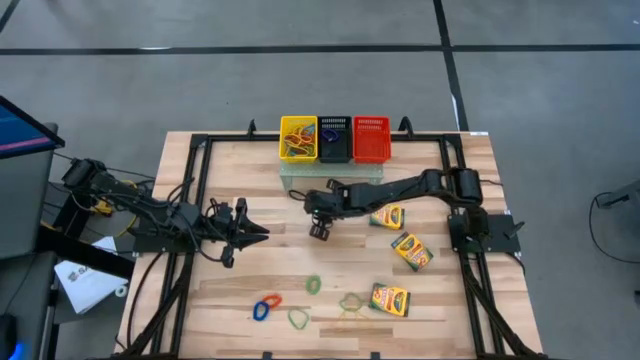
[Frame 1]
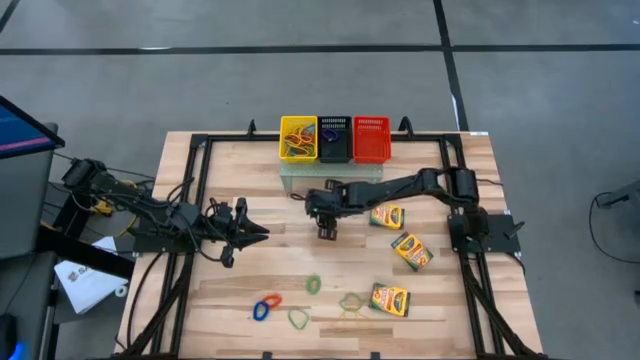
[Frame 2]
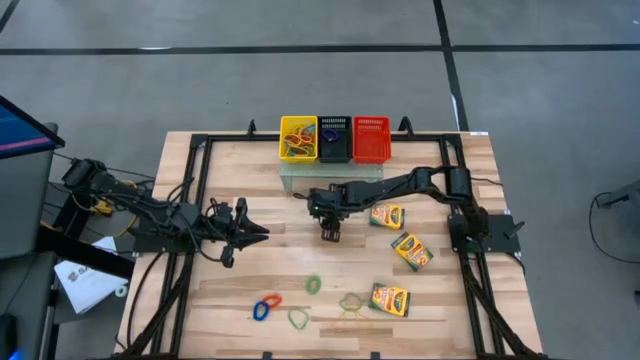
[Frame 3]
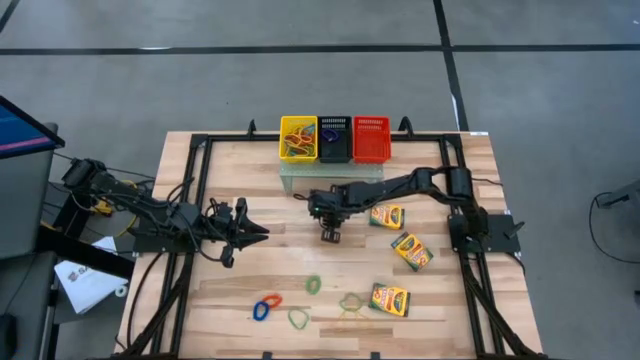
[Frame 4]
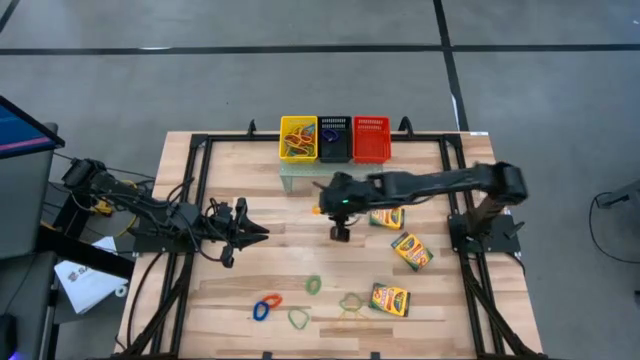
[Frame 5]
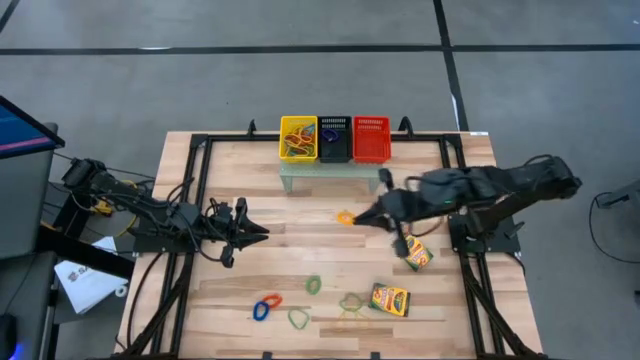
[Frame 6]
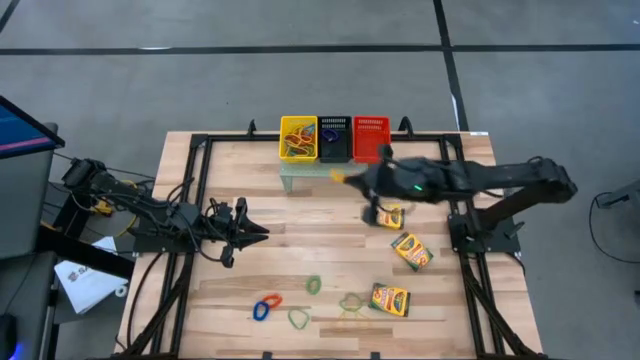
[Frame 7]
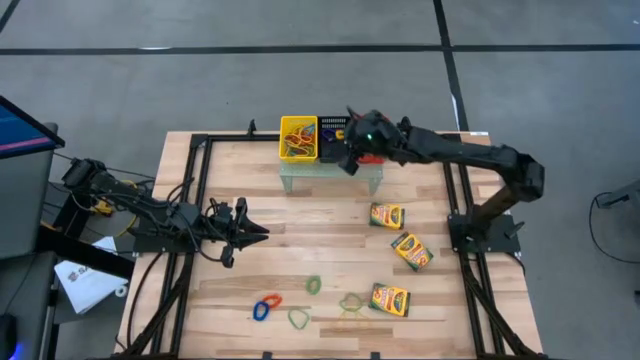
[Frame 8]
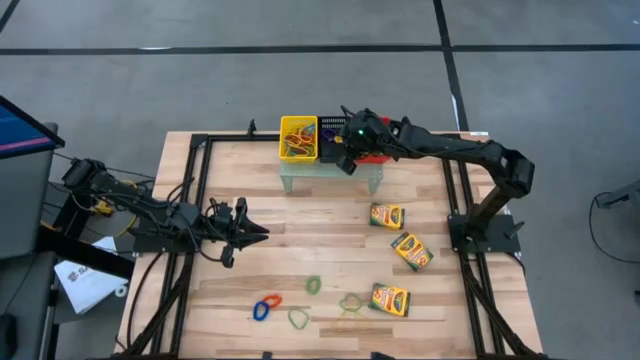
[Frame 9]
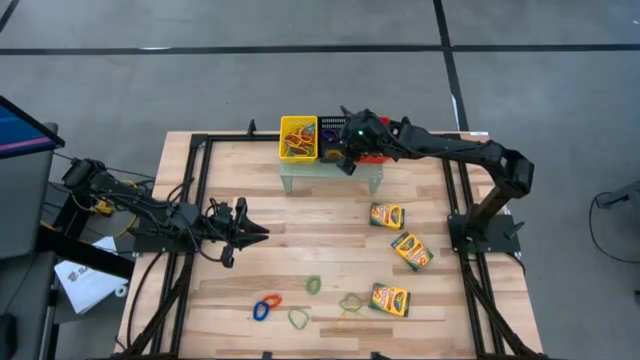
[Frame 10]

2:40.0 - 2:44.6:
Task: Pick & Place Office Desk Supplies
Put the yellow spring keychain into the black bin on the shelf

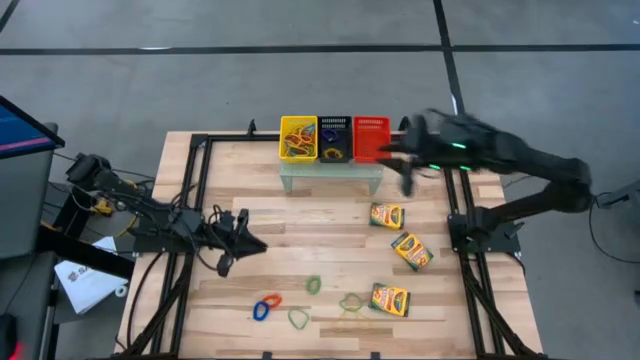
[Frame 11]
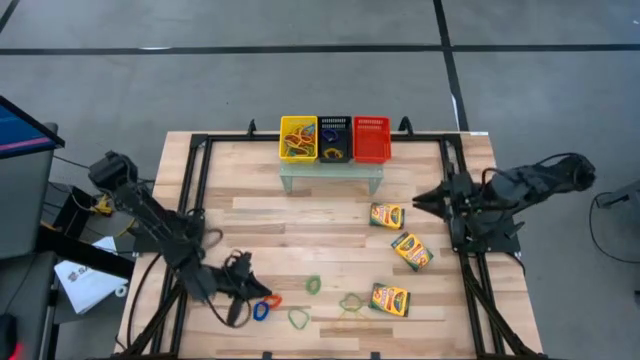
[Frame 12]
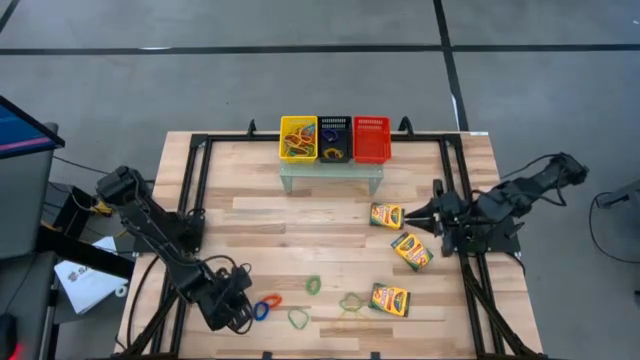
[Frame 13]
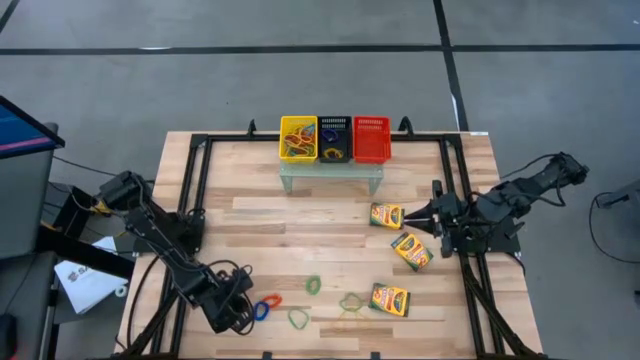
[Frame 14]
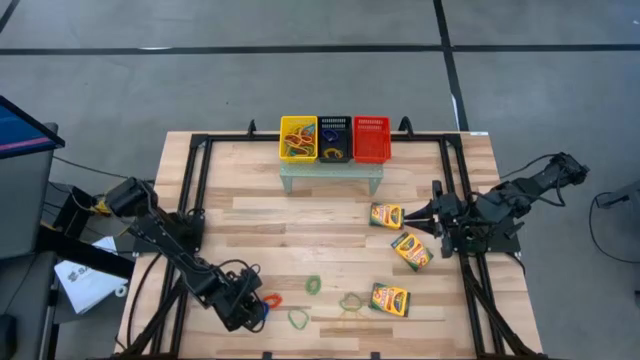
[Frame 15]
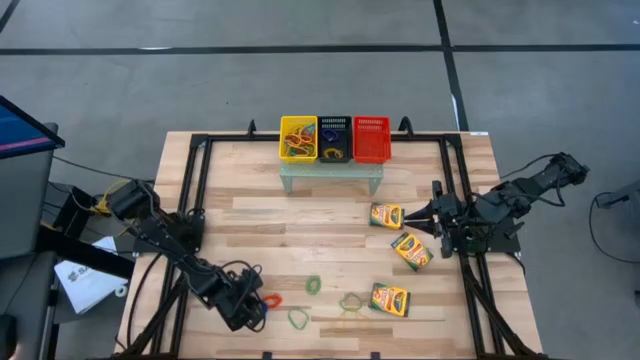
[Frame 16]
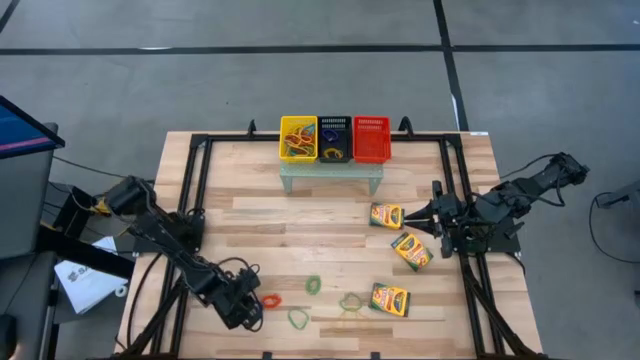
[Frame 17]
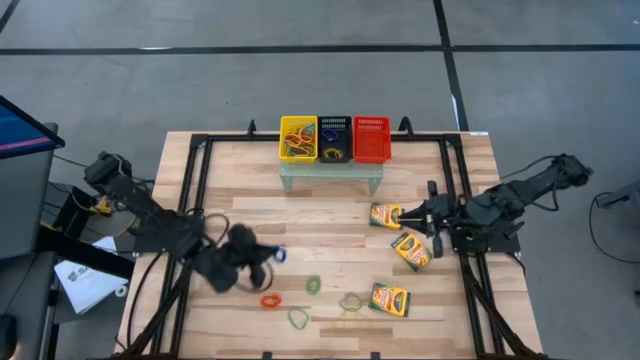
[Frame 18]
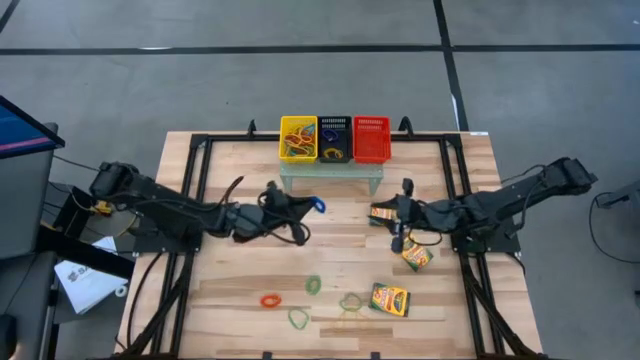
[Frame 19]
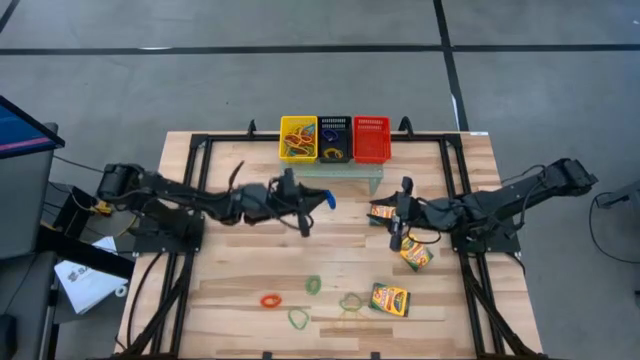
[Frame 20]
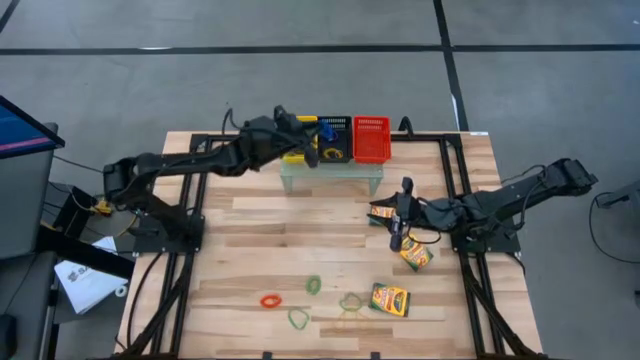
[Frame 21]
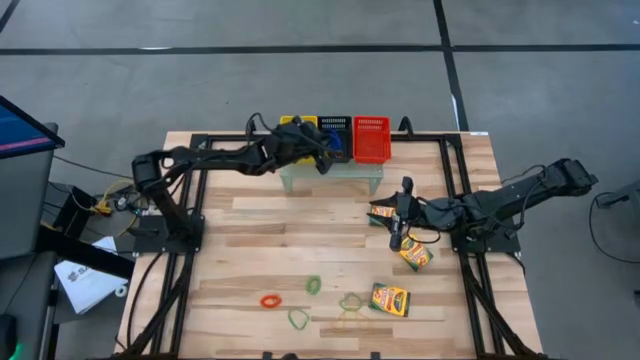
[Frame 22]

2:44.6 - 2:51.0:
Put the dark blue spring keychain into the black bin on the shelf

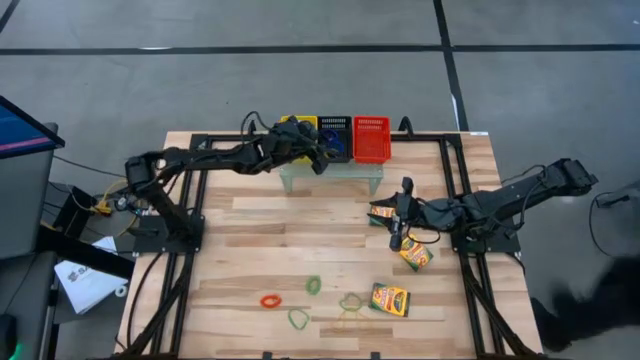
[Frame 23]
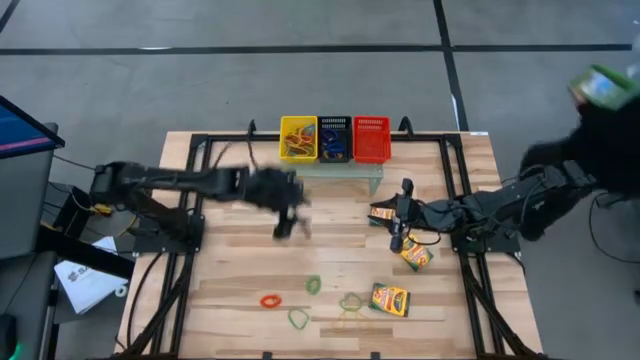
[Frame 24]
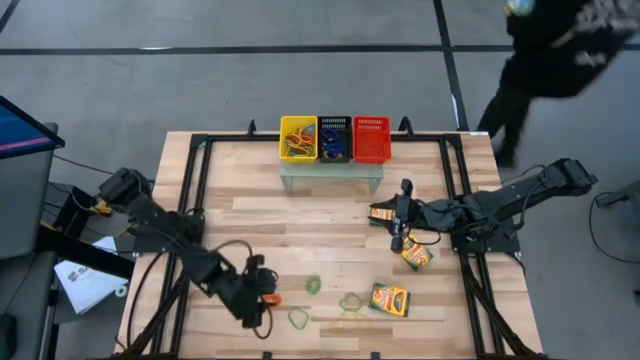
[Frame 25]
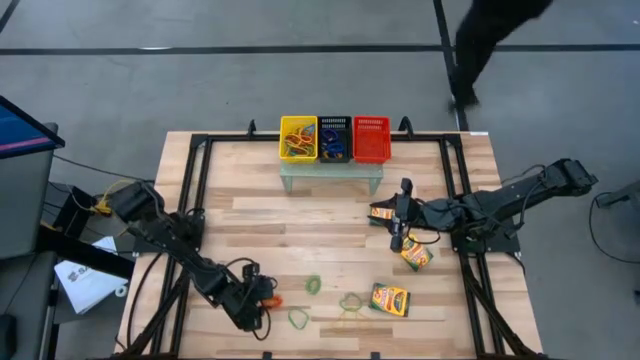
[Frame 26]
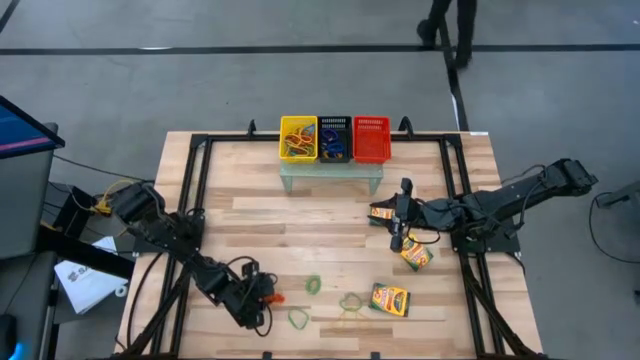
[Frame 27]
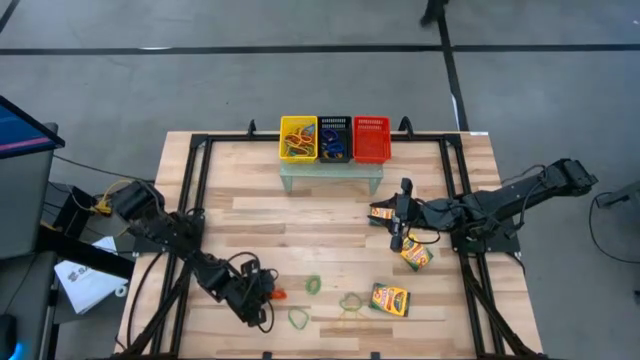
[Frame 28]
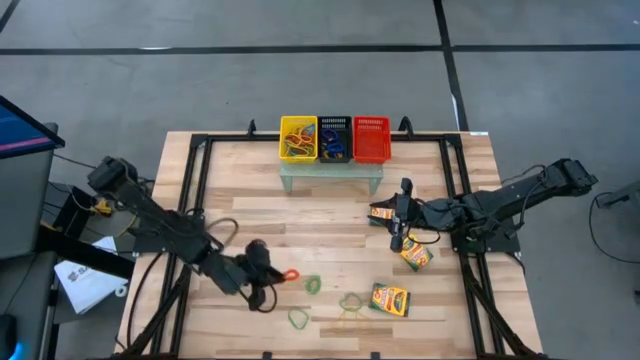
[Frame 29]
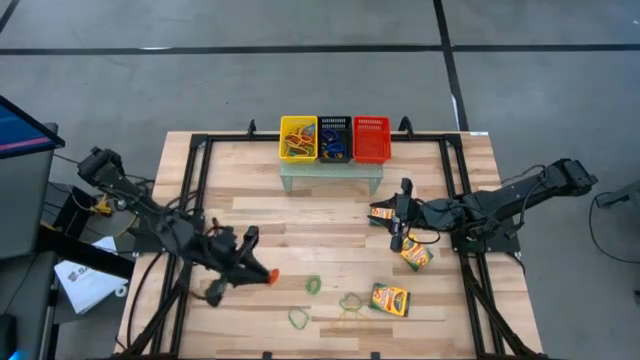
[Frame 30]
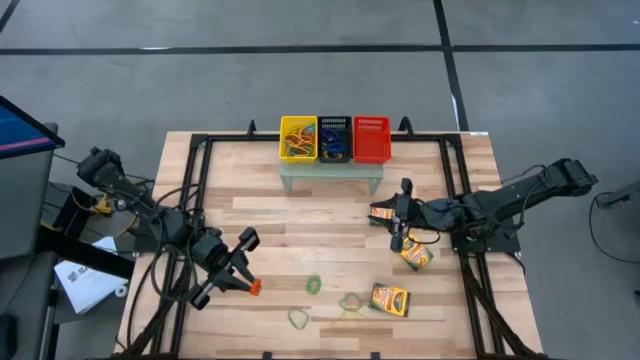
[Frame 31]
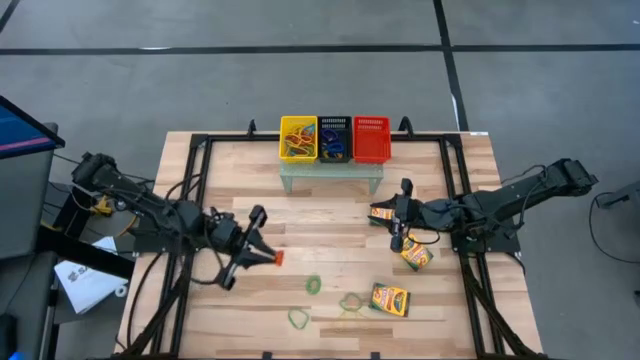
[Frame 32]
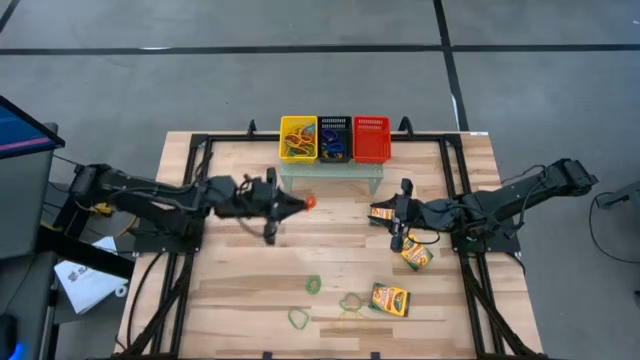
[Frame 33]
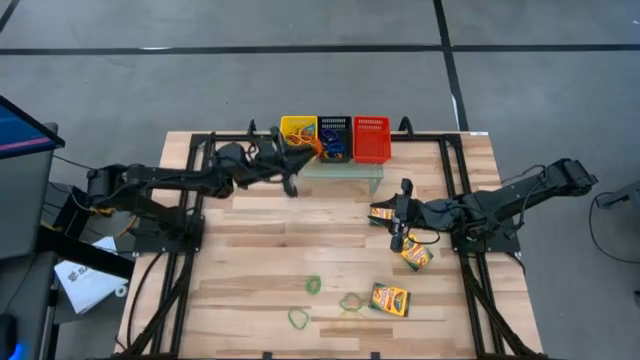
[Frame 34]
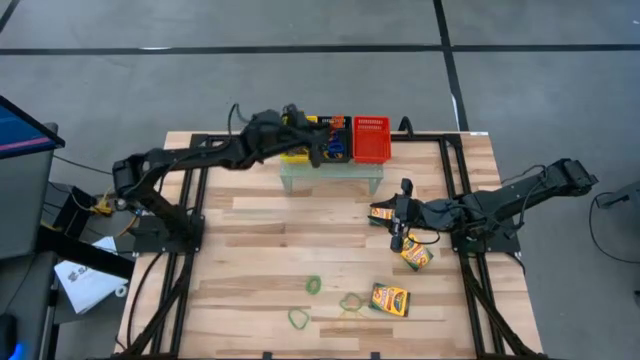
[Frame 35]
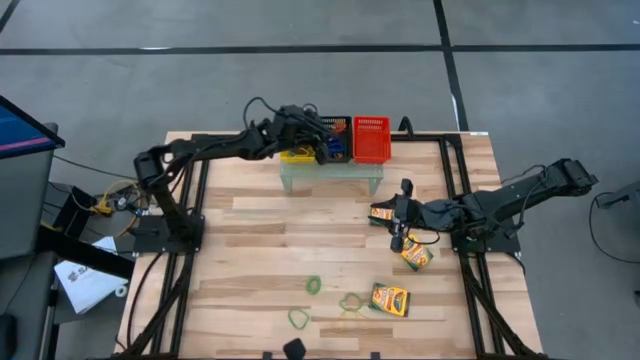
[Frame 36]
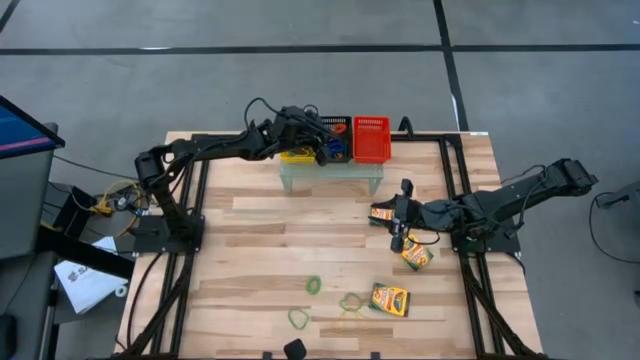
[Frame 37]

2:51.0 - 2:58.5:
Put the orange spring keychain into the black bin on the shelf

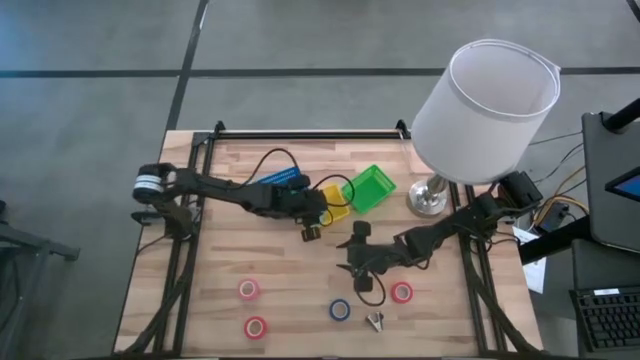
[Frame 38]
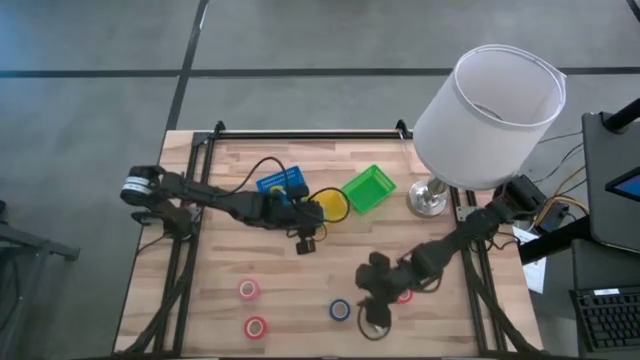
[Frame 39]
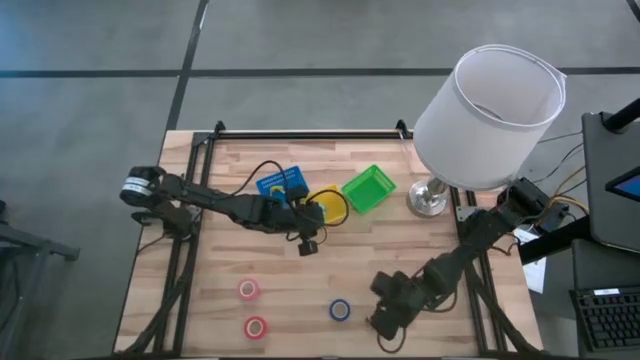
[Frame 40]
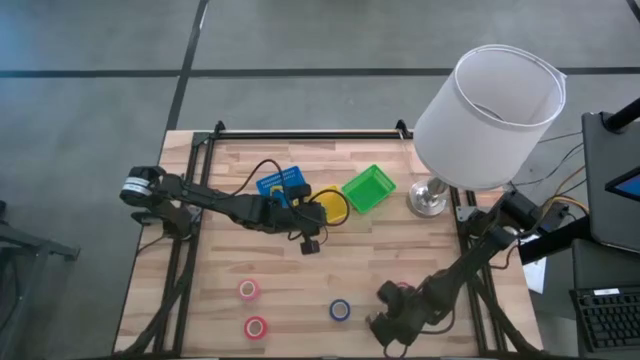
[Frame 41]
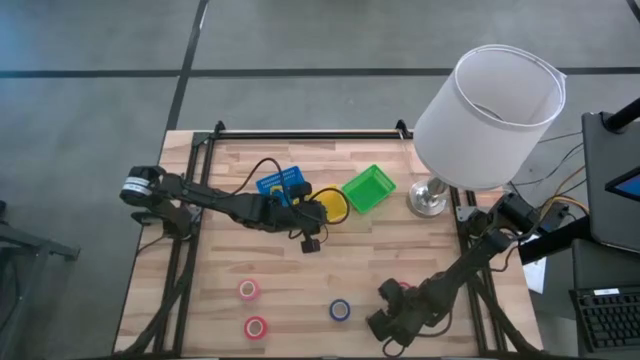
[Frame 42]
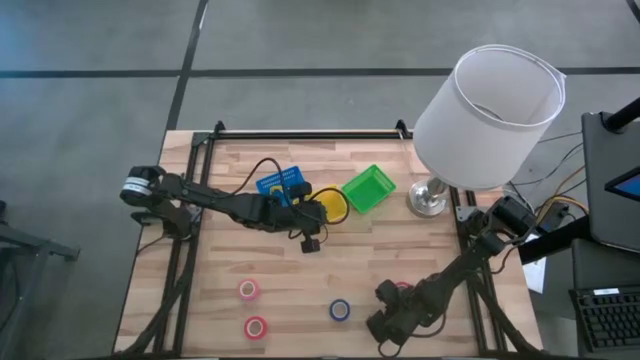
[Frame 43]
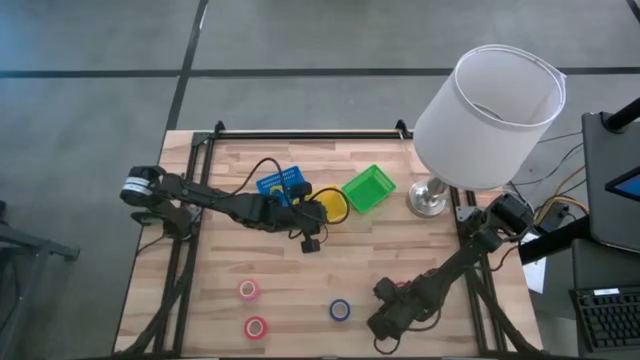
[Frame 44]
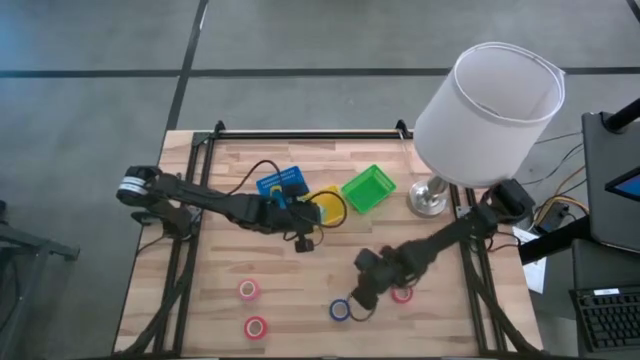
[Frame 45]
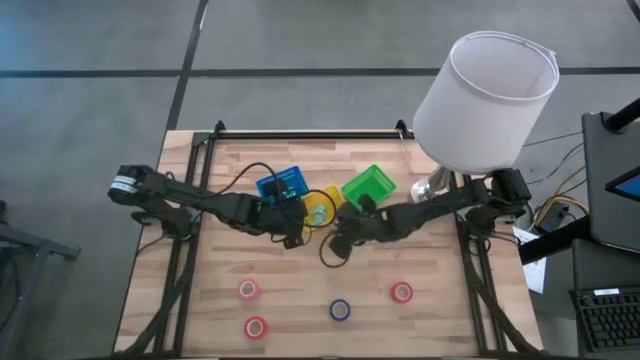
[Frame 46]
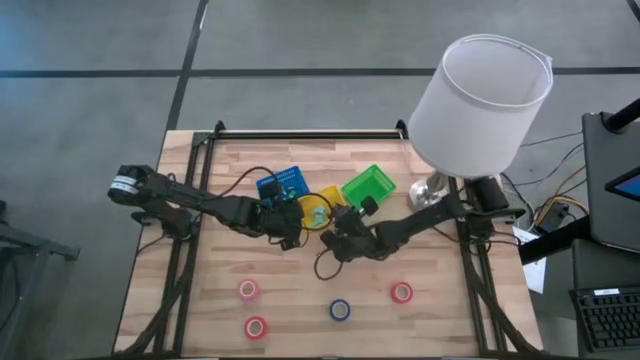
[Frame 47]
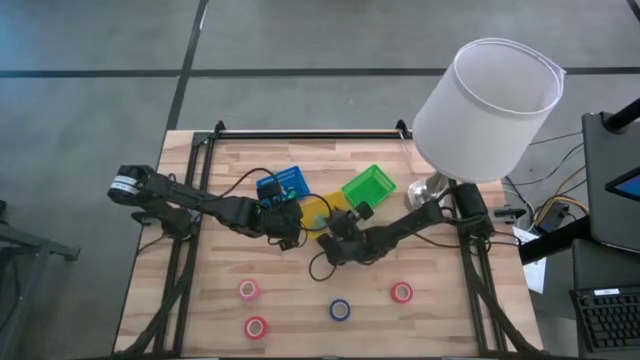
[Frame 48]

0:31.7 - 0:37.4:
Task: Pick and place Stapler, Stapler remover, tape
Put the dark blue staple remover into the yellow bin
